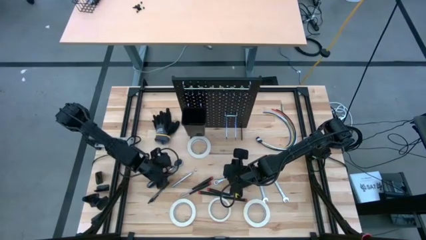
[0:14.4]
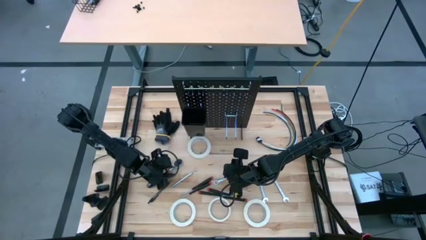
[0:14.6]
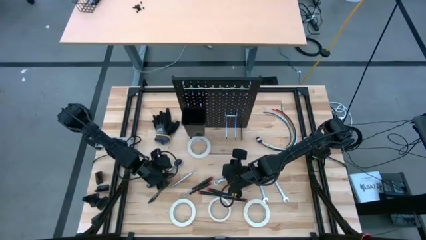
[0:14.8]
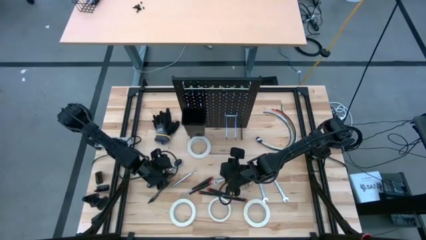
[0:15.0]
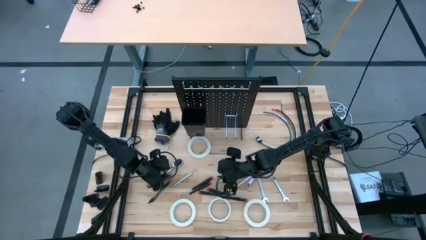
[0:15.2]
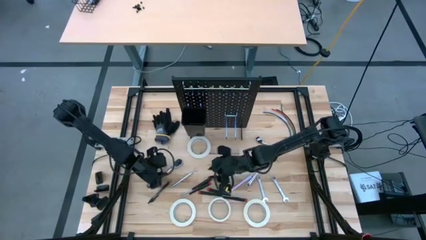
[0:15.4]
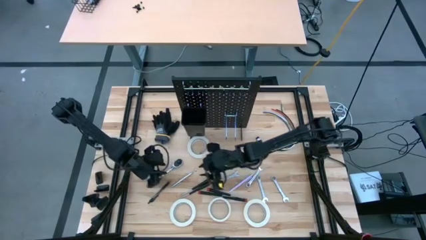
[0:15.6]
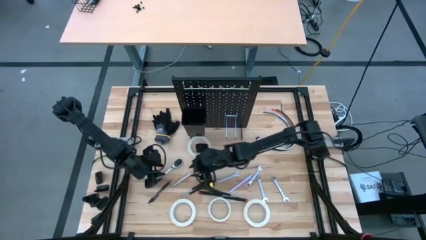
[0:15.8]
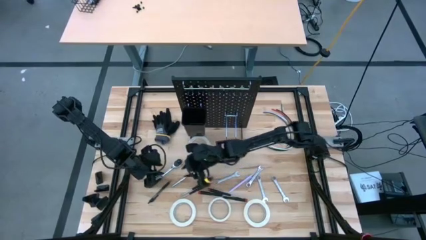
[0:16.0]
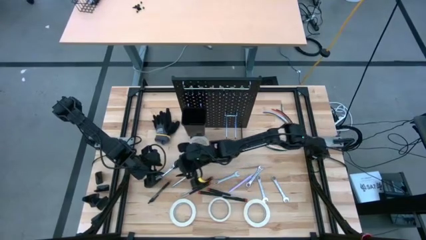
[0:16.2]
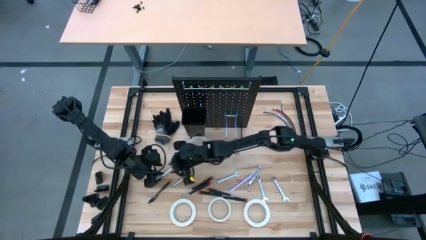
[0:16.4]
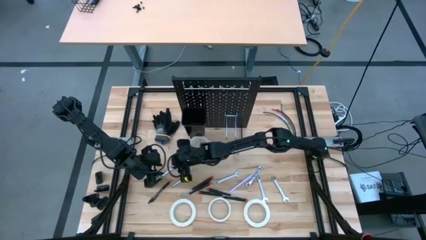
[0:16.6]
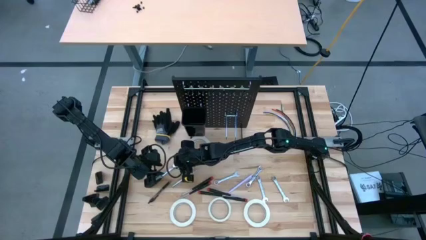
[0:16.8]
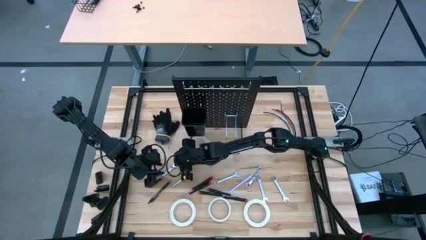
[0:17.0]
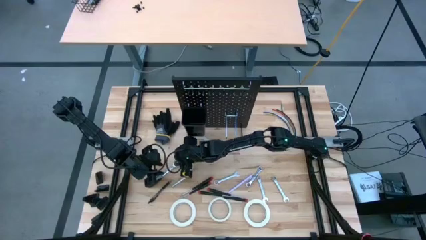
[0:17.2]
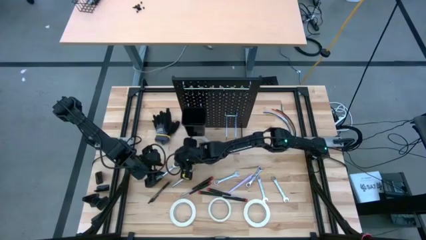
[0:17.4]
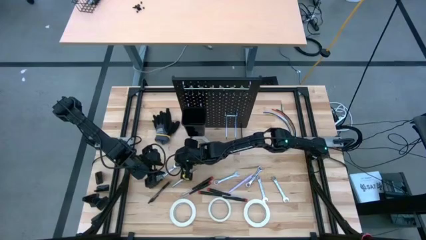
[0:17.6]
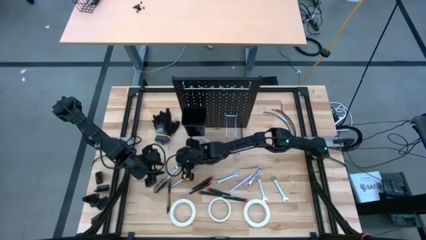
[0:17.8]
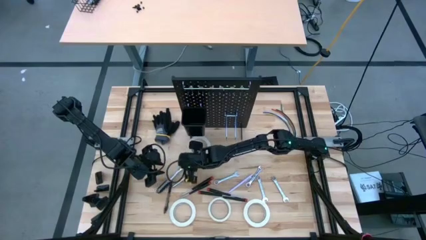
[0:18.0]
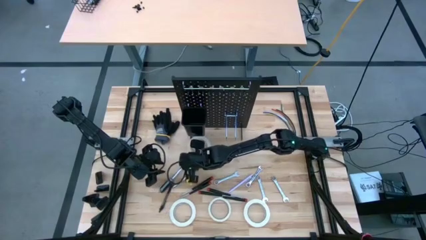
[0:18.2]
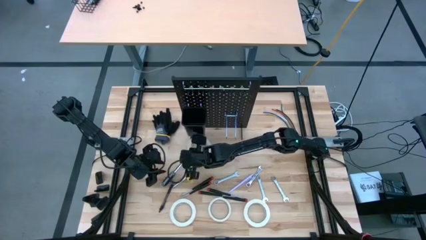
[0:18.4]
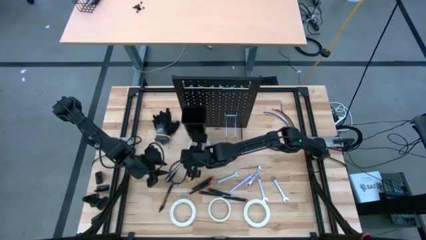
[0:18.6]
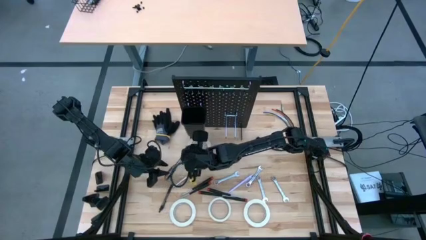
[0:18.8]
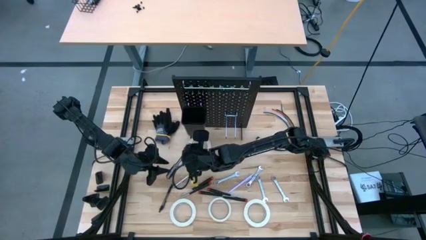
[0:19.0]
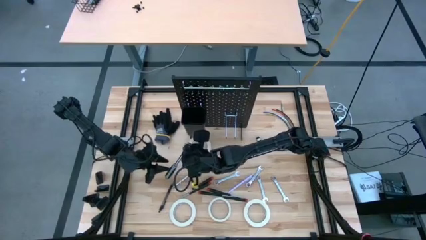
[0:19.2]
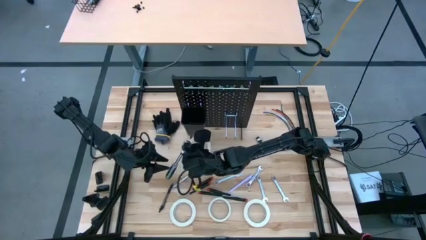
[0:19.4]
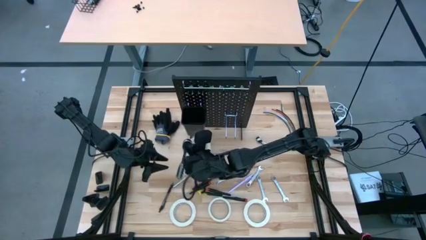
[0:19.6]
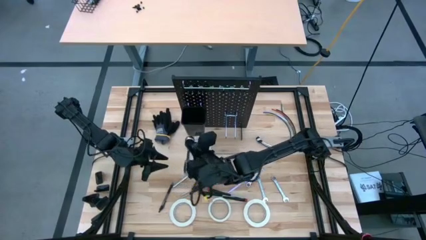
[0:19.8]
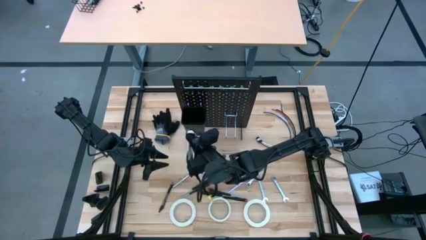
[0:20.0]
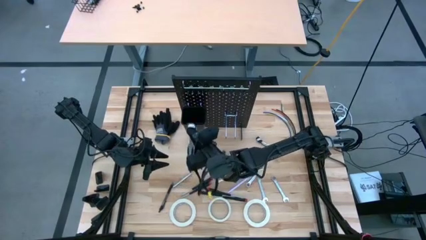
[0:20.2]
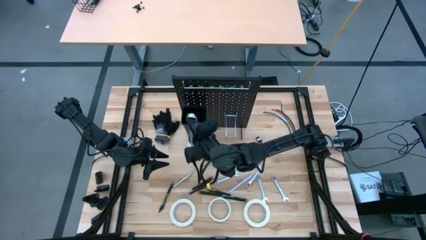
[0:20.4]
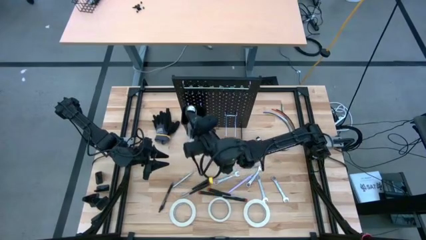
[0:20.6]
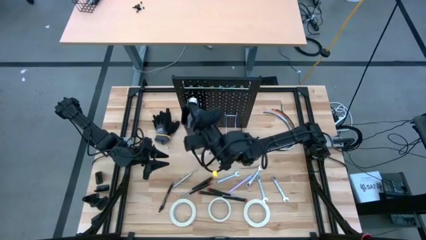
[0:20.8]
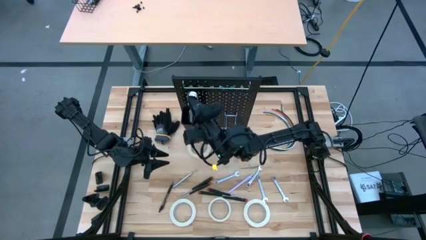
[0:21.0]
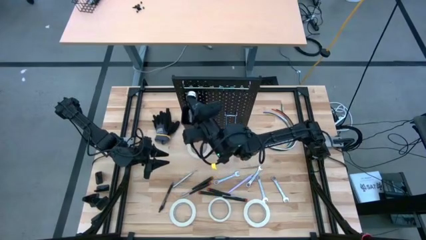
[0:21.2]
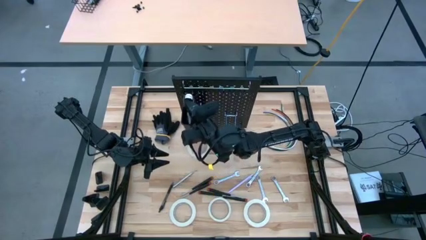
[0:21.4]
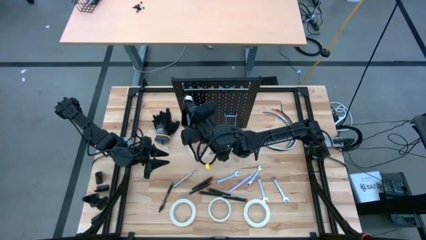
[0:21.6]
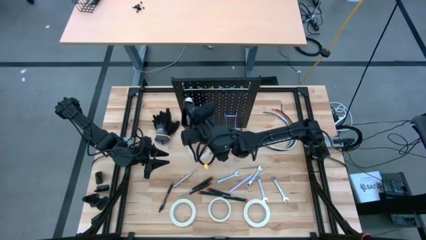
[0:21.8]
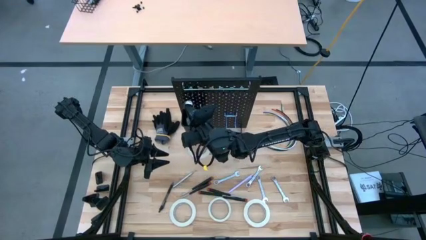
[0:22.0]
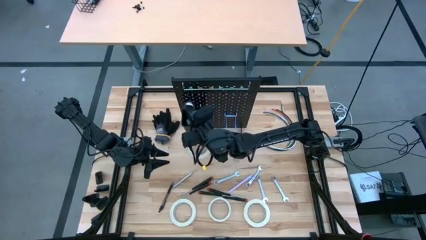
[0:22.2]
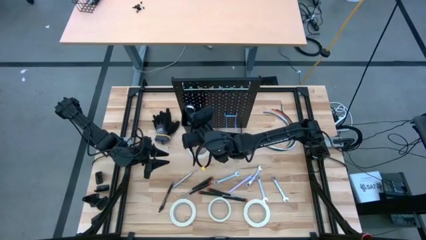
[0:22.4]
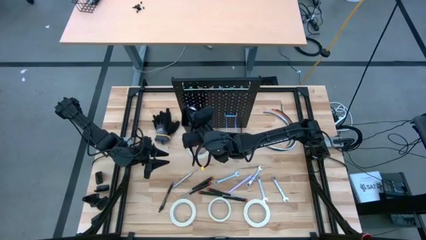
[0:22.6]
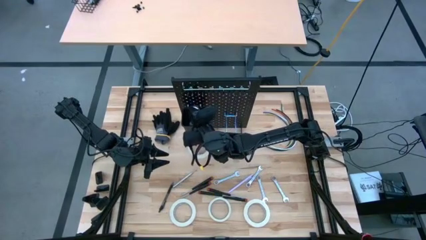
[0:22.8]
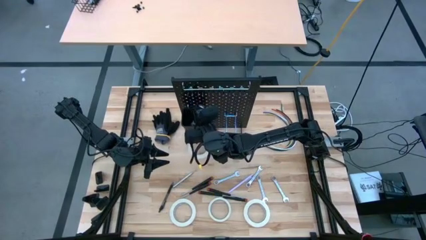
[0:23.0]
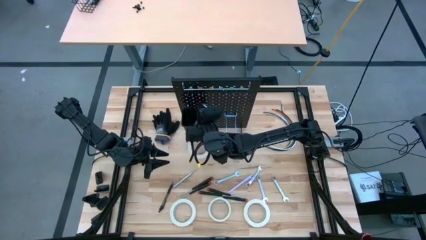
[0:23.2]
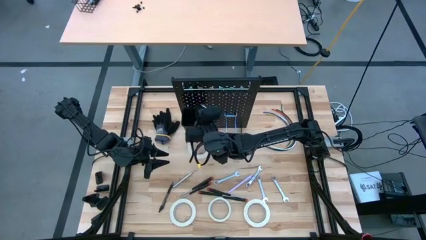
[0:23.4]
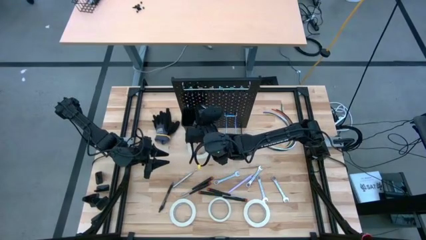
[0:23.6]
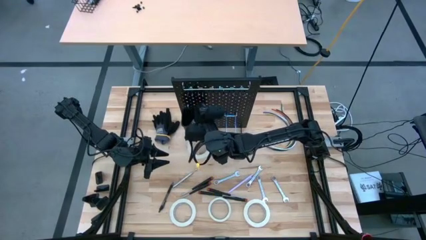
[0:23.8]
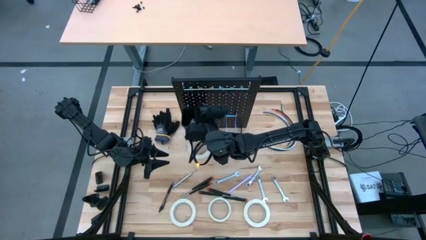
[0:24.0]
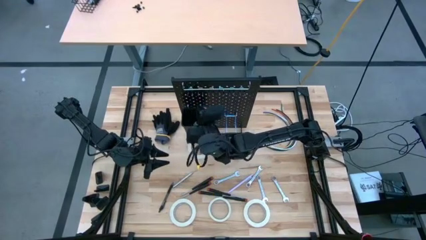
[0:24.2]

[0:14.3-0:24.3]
Task: Hang tools onto peg board
Put the gray ratchet wrench into the black bin on the peg board
